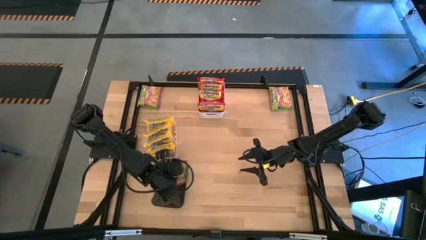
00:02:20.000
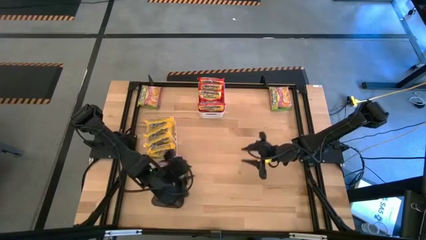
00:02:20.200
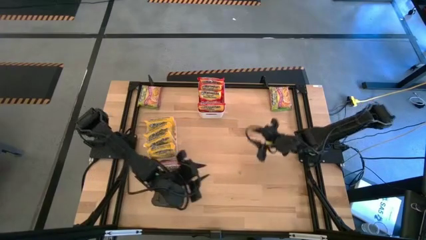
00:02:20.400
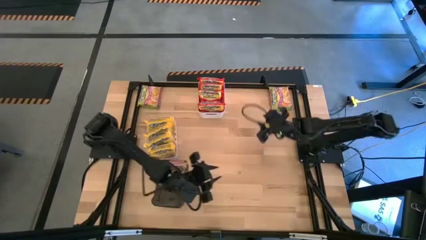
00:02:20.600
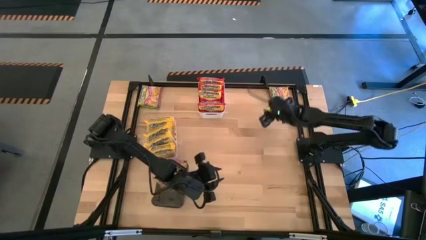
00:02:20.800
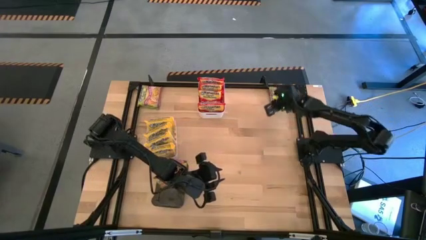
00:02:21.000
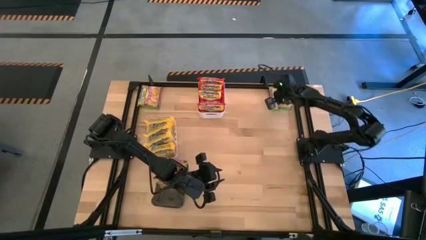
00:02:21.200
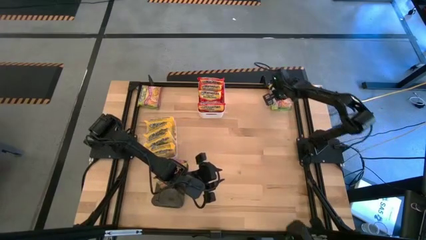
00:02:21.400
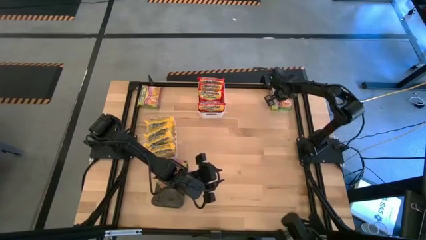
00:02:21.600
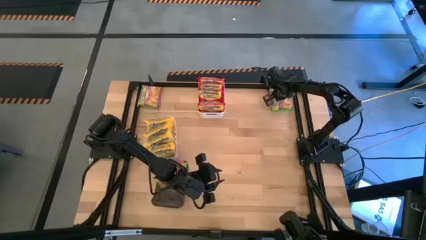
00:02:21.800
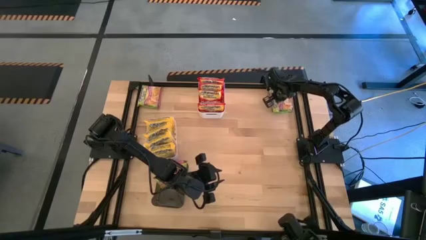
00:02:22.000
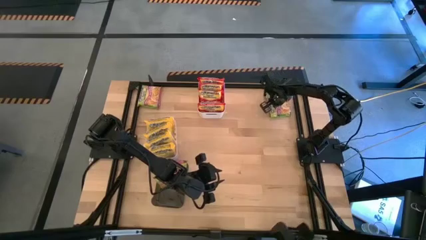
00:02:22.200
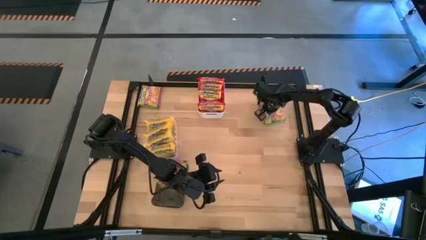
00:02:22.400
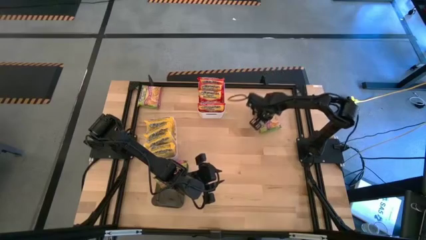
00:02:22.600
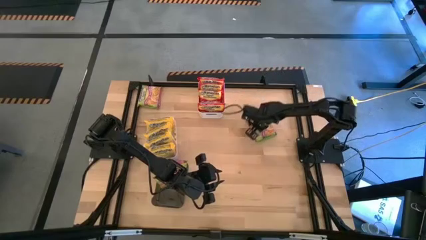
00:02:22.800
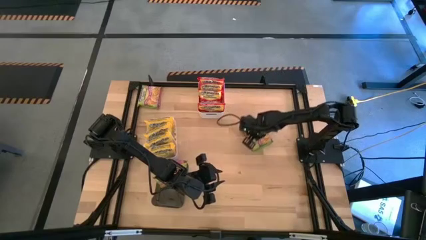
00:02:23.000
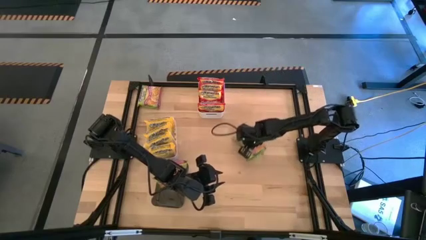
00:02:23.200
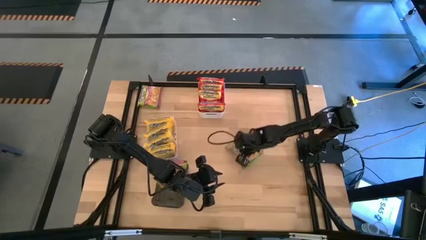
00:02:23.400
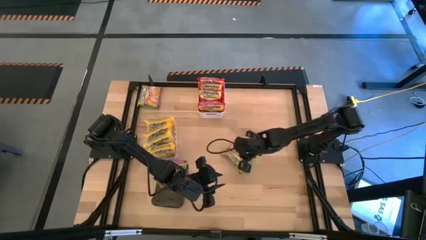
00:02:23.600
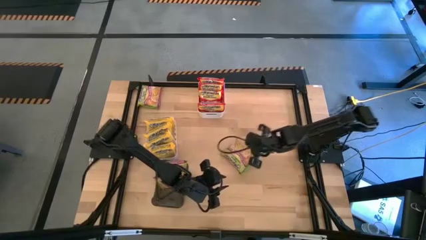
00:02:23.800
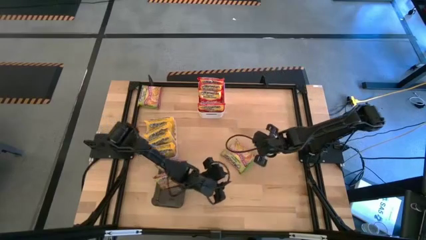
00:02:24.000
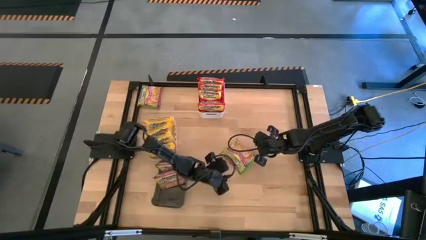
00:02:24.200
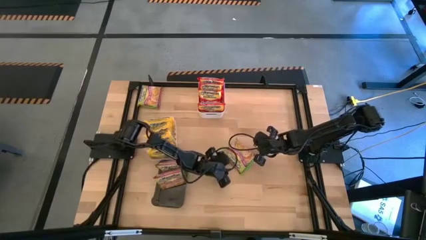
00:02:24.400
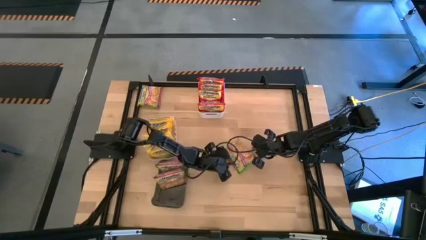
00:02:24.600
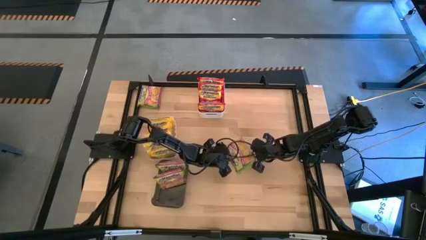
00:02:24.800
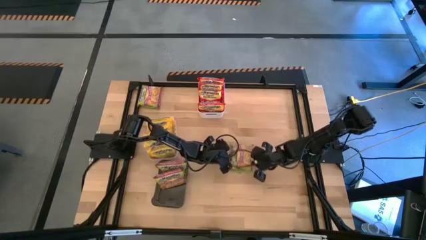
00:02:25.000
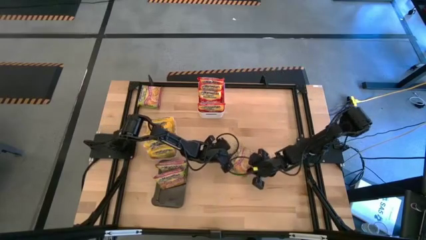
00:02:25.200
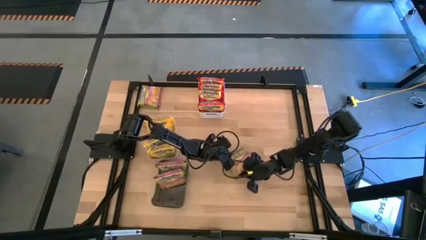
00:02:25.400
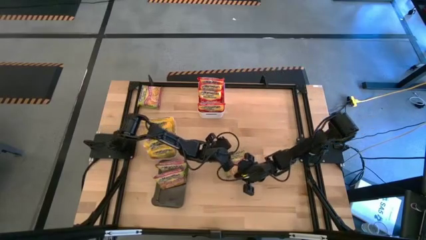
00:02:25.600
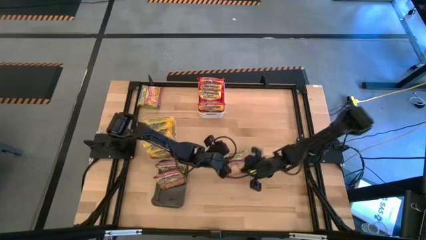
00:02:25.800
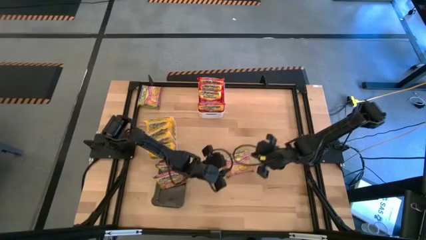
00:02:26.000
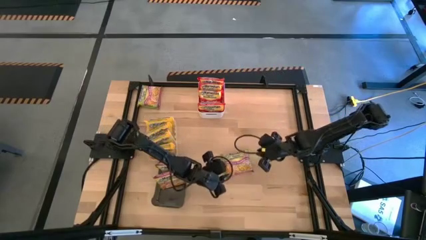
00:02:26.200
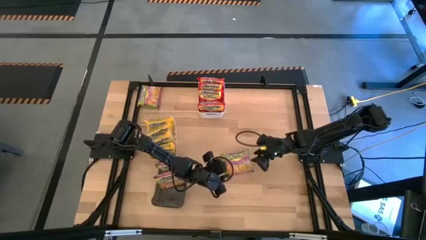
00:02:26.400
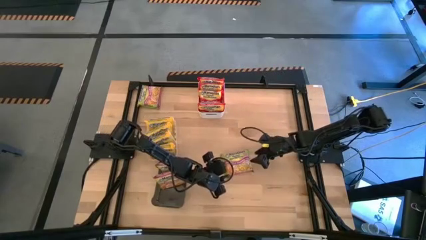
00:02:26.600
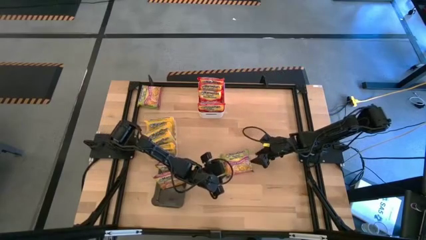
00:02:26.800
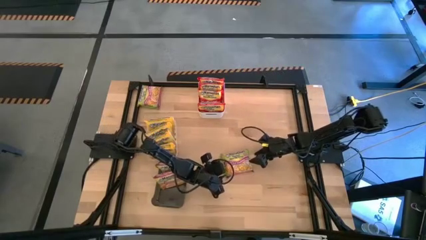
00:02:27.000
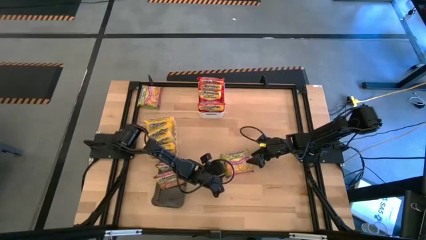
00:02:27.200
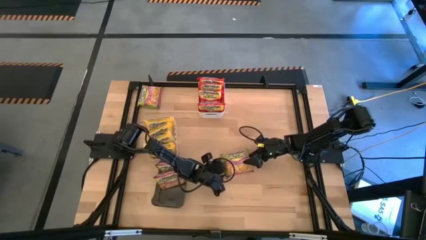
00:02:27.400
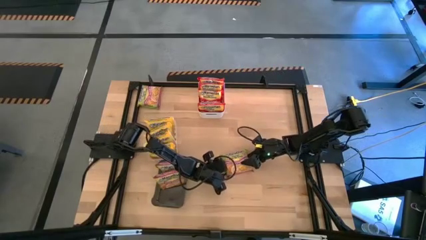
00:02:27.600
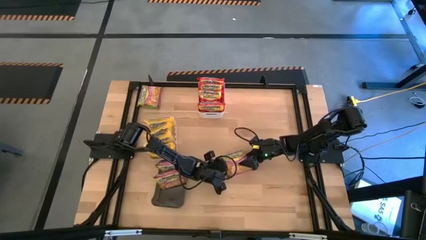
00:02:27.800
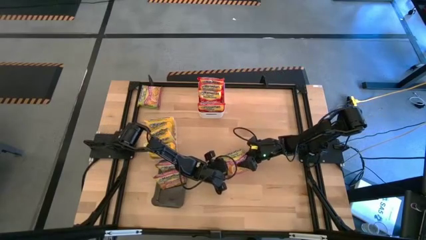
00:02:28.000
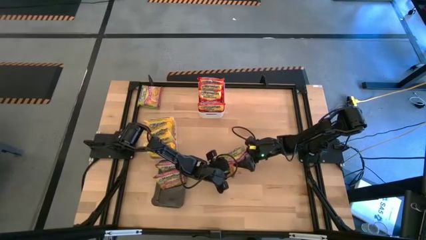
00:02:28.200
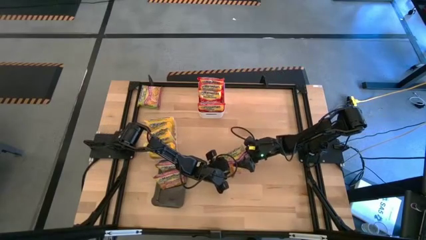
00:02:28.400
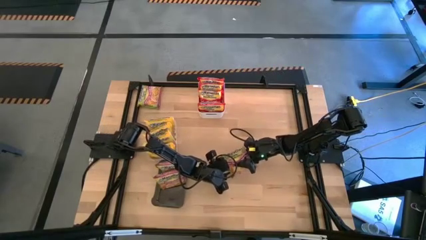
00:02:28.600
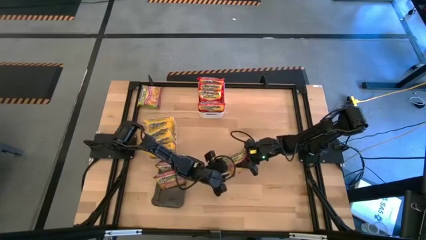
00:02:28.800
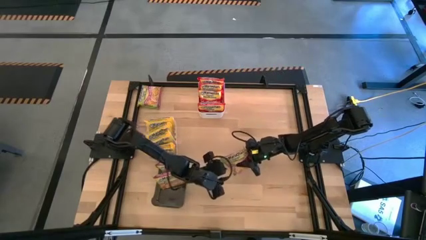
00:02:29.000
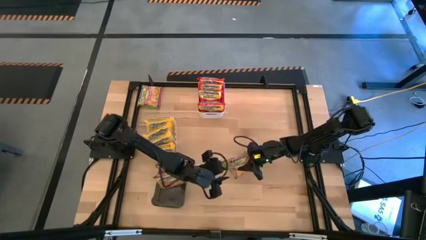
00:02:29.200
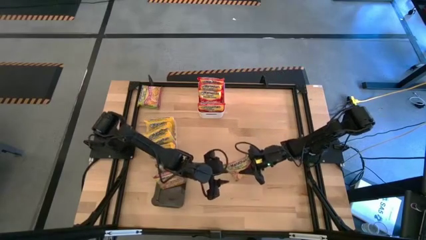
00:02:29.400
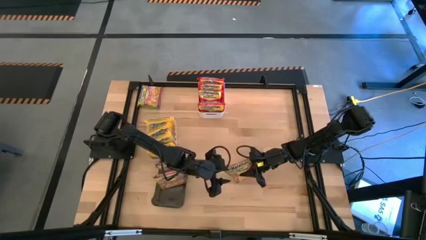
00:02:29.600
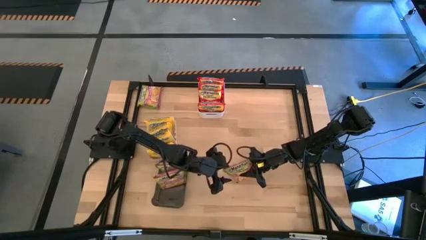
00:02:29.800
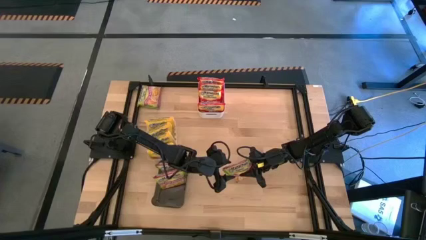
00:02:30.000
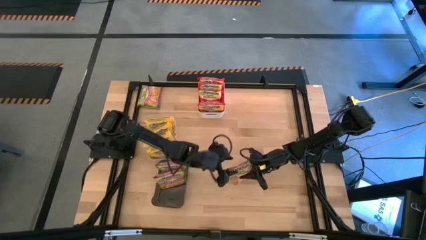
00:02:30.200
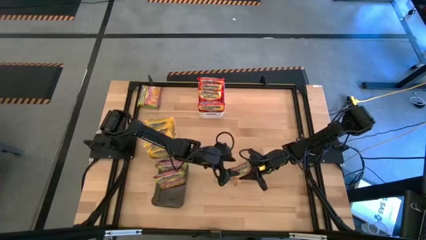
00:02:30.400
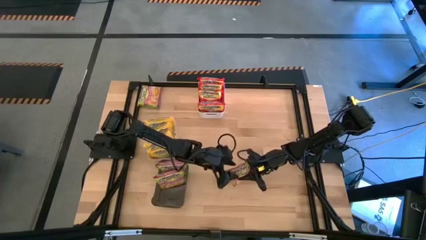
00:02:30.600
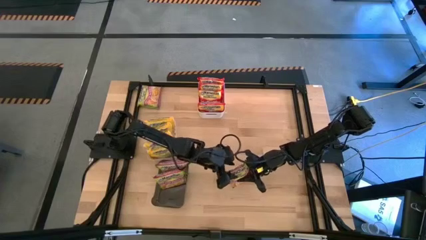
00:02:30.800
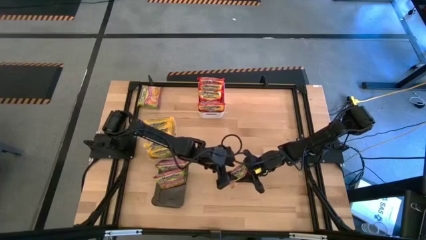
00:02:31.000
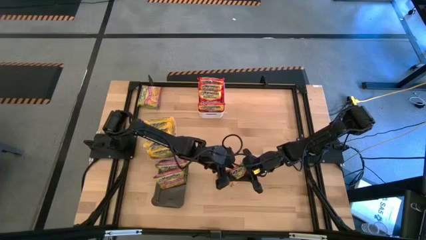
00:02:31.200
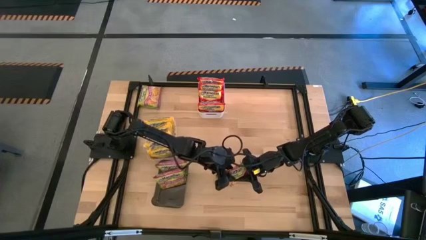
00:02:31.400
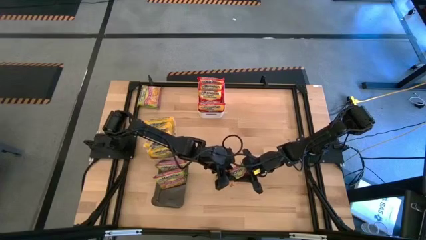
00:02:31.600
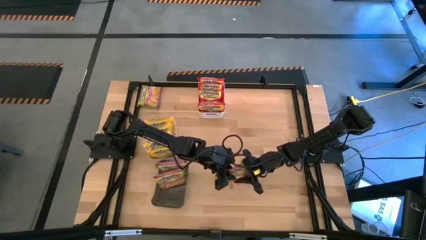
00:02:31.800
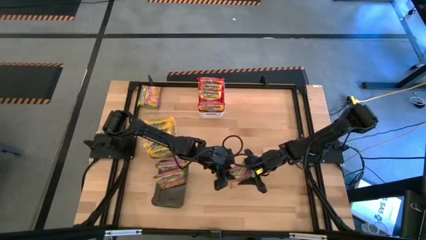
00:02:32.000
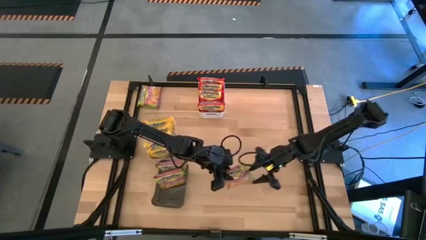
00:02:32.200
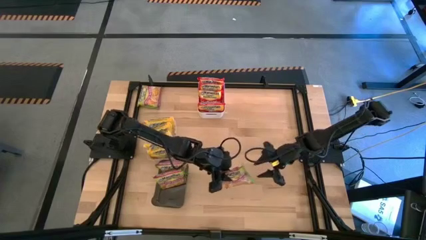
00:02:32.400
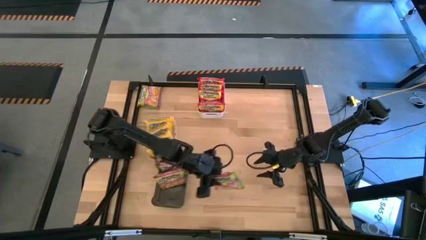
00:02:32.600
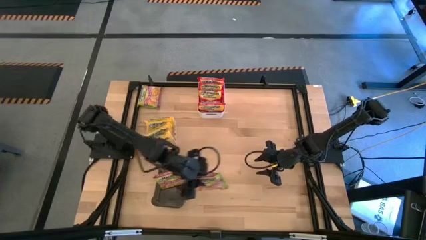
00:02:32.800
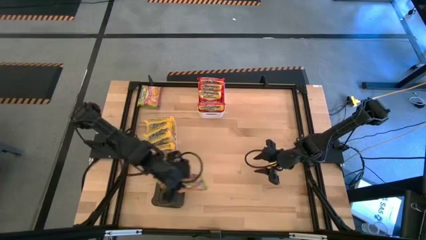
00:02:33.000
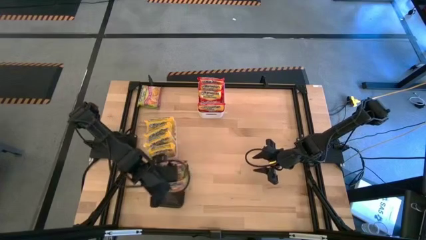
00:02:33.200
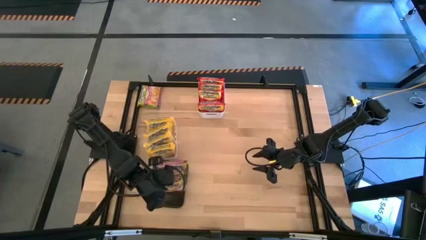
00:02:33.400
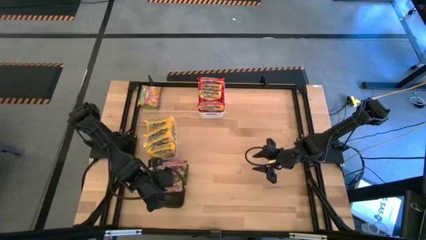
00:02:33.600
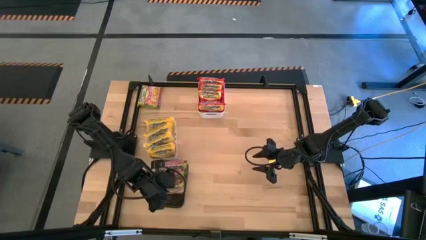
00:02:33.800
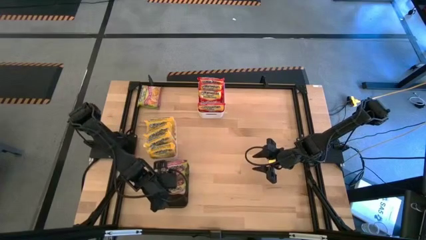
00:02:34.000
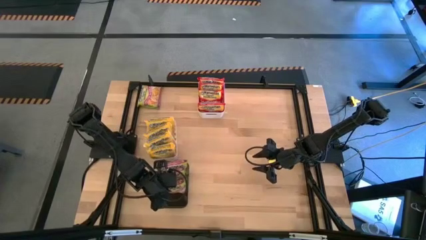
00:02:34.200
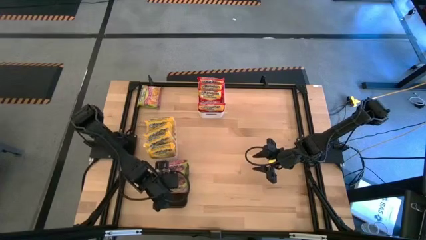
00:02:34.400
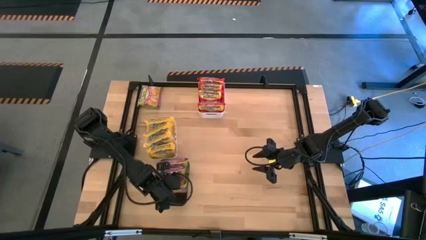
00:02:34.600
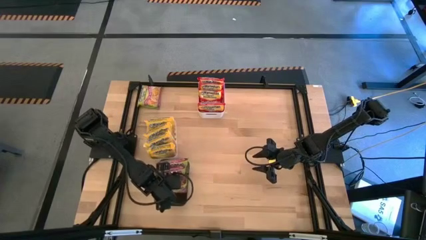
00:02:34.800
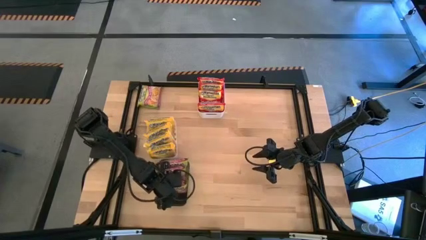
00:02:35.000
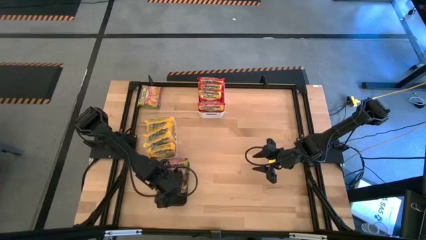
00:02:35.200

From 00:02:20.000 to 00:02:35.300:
Task: Sort Maruchan noodles
Put the green noodle pack into the black bin

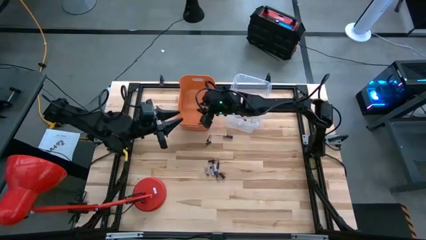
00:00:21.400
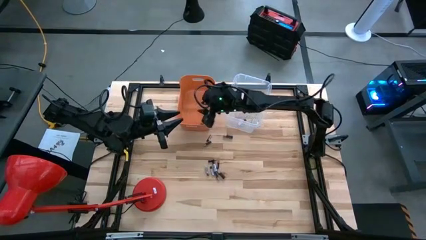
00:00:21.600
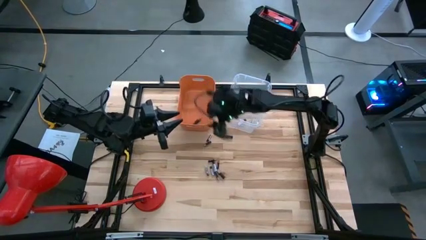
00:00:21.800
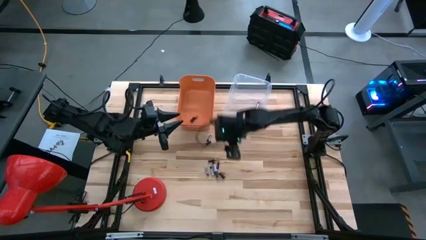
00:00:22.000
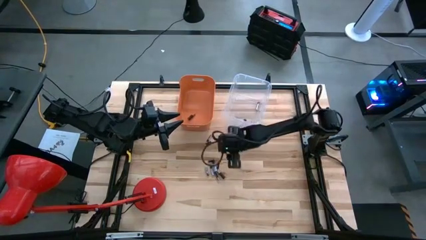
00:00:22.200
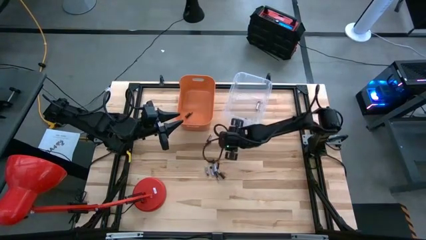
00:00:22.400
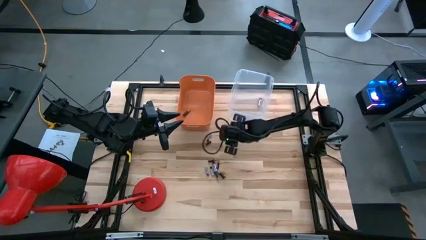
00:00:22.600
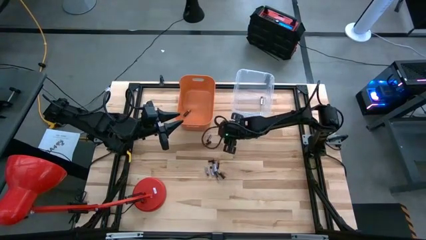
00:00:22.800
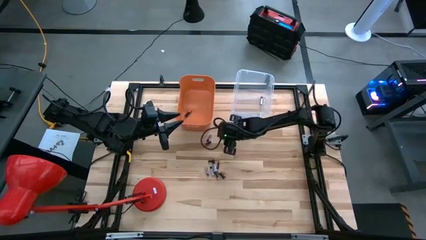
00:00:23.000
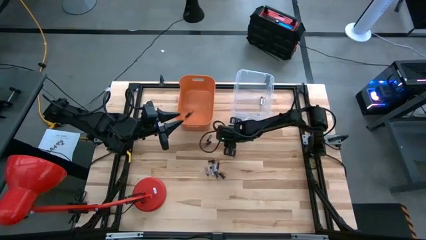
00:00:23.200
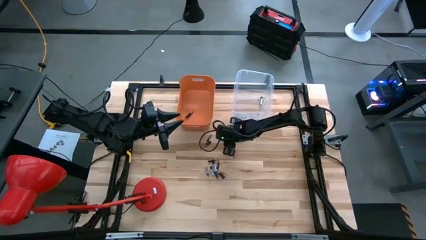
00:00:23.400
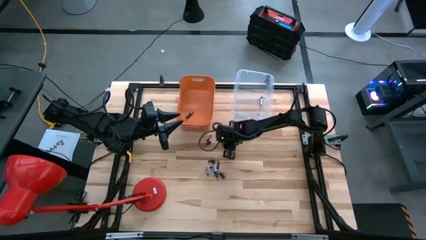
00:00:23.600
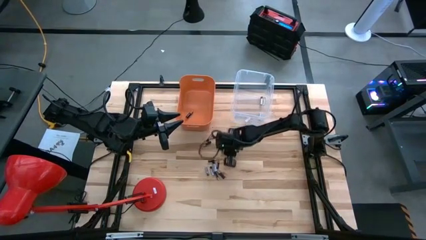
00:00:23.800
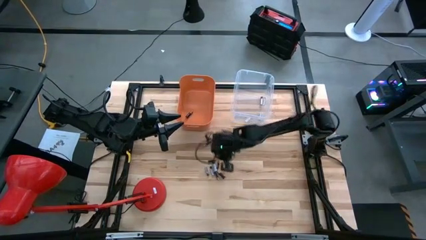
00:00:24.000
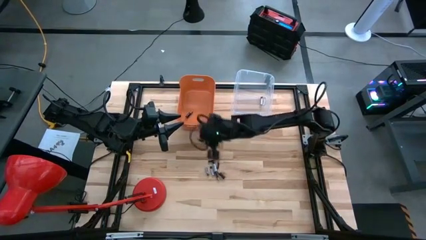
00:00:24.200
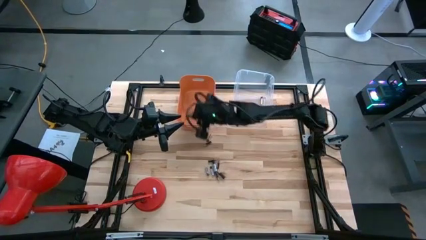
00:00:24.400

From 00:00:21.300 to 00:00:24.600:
Task: Sort batteries
Put the brown battery into the orange bin
